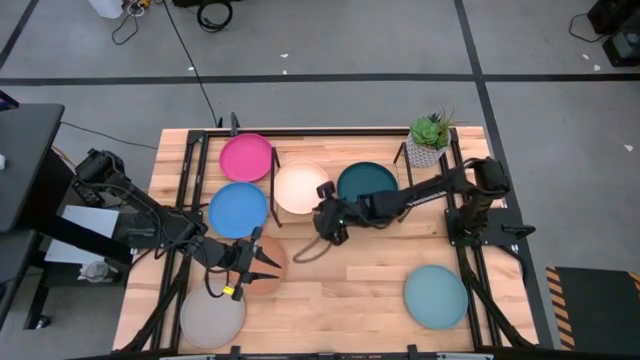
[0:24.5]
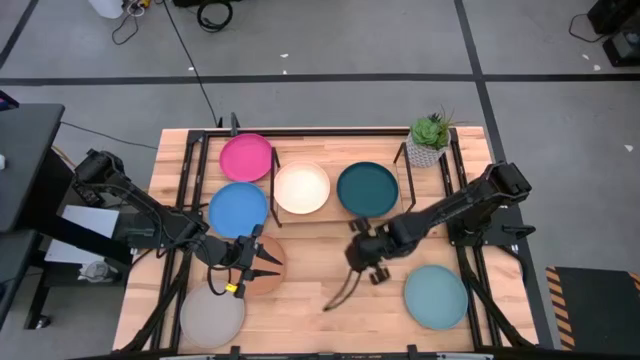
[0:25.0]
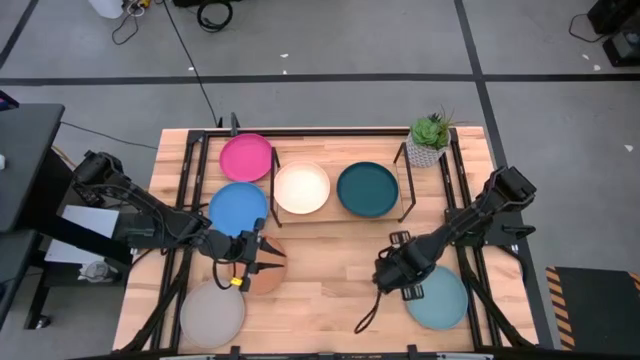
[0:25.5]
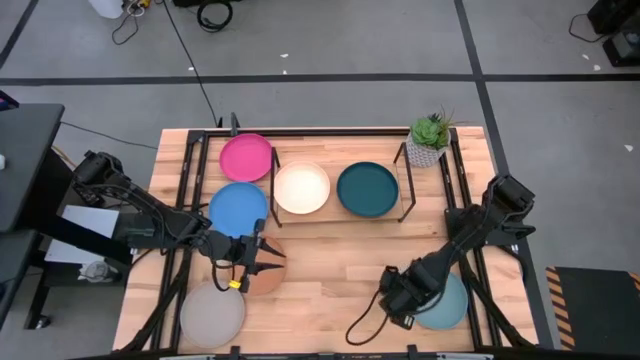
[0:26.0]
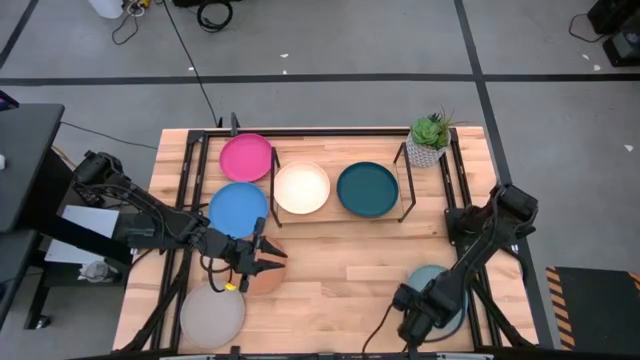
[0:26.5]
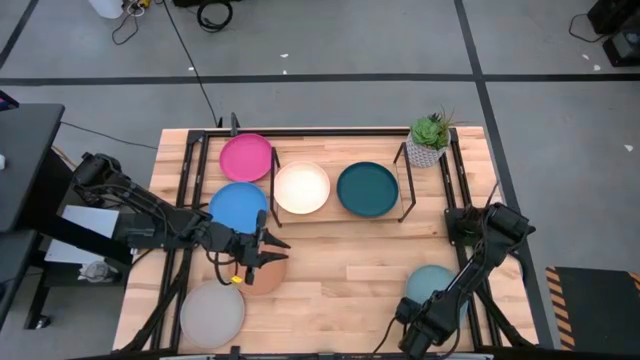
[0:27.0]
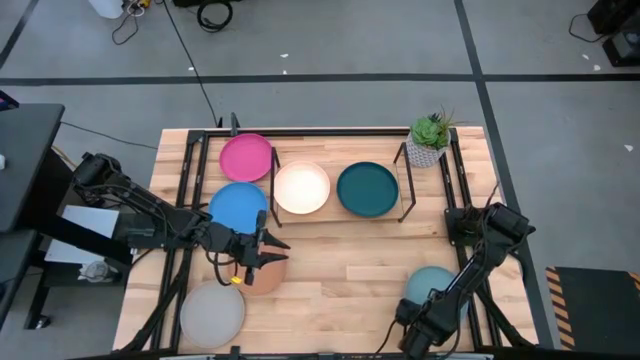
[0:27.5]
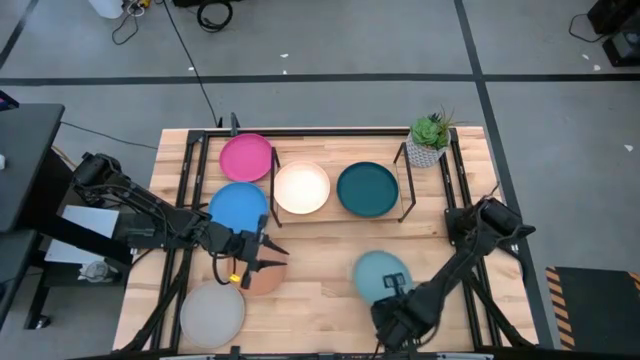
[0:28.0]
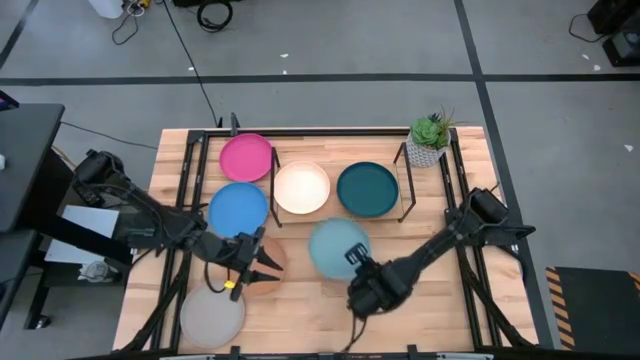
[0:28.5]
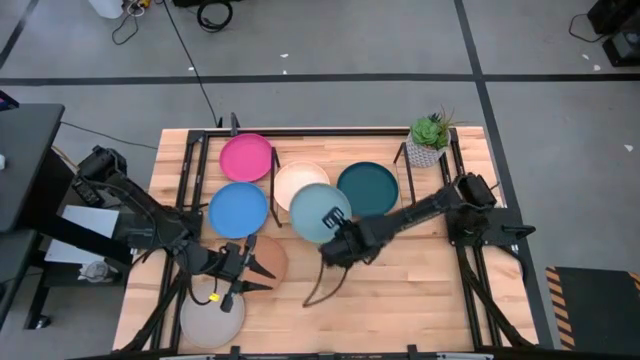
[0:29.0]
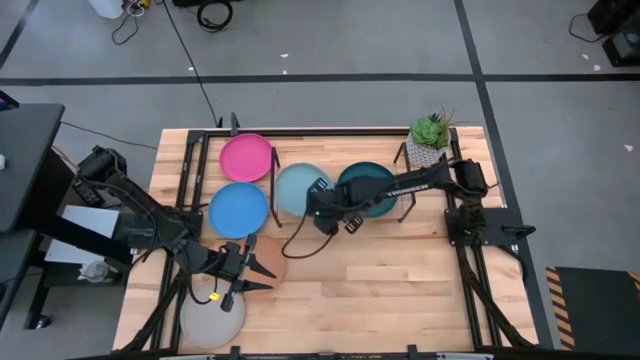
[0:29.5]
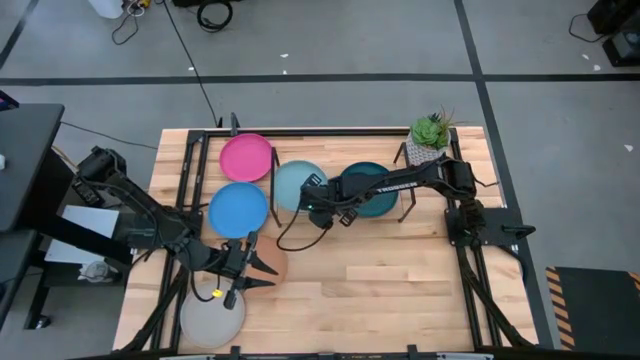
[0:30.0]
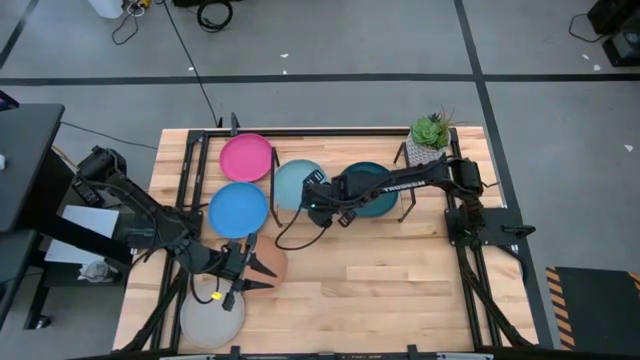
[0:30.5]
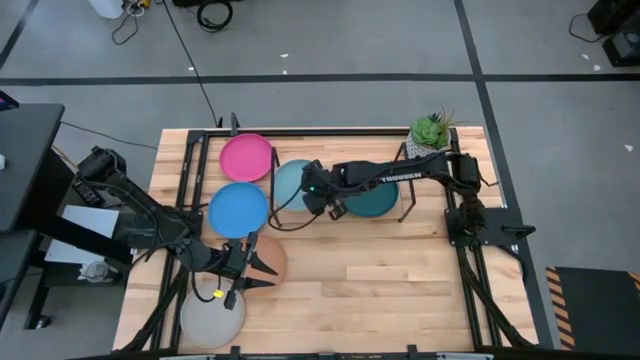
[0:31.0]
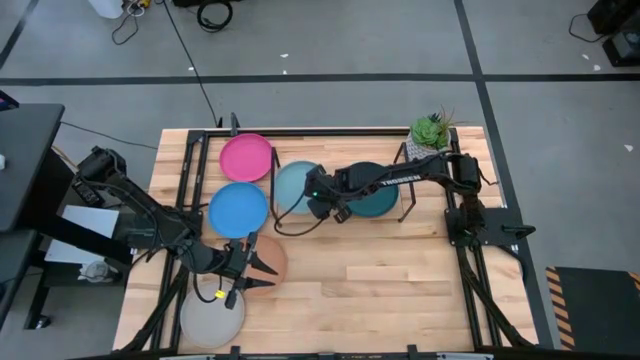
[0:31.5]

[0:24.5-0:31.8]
Task: Place and stack plates onto a shelf
Stack the light blue plate on top of the light orange plate on the shelf

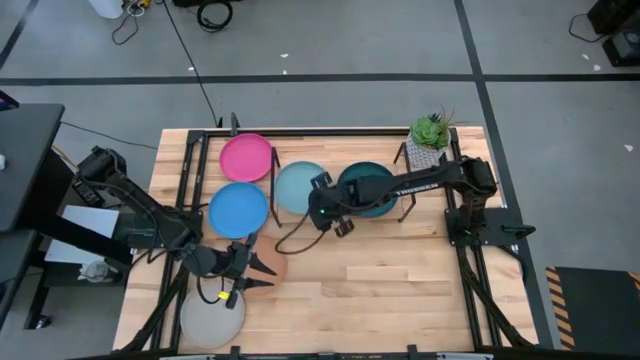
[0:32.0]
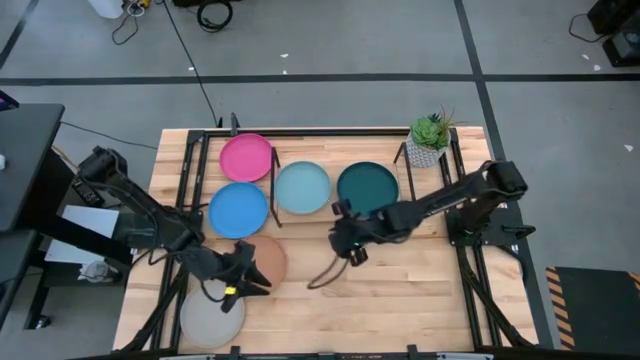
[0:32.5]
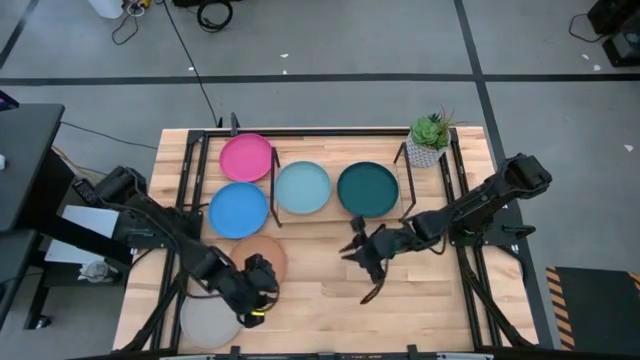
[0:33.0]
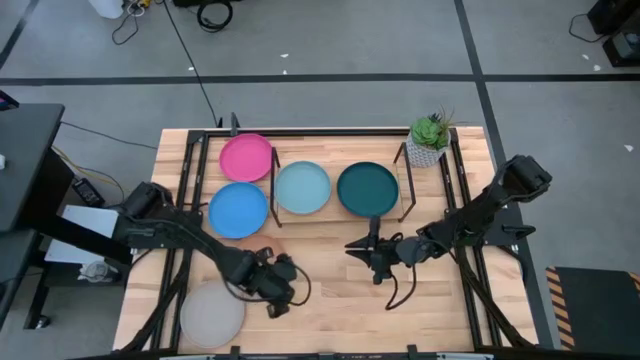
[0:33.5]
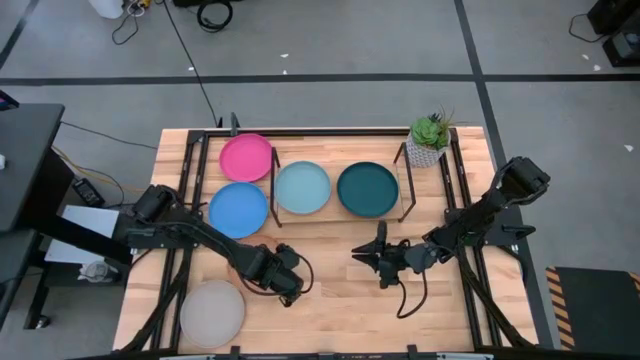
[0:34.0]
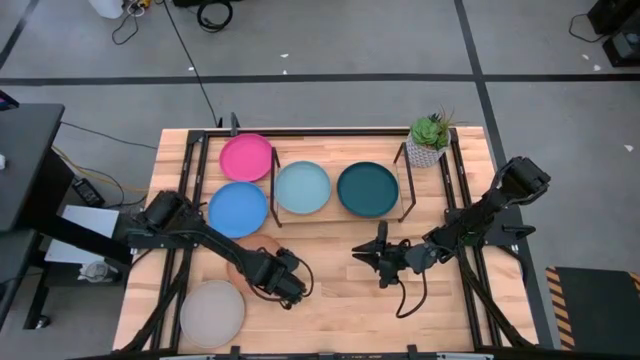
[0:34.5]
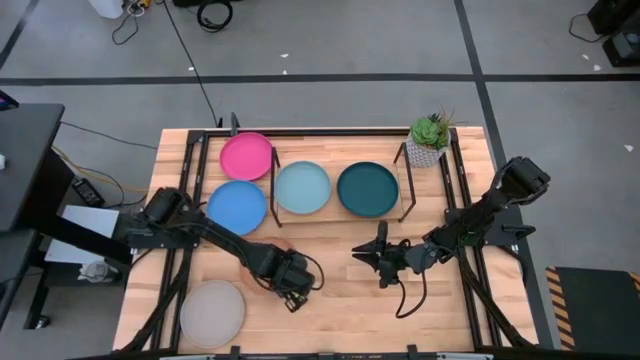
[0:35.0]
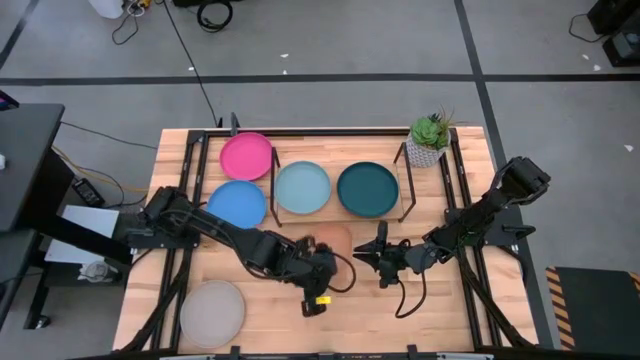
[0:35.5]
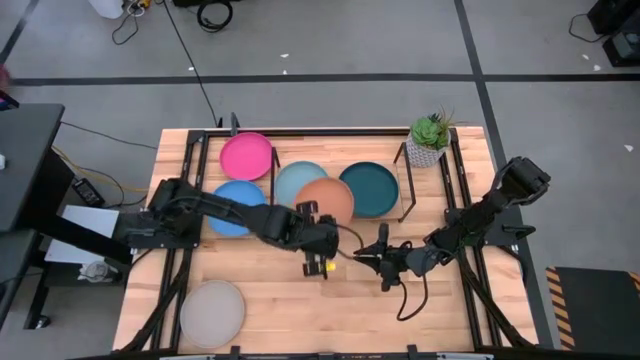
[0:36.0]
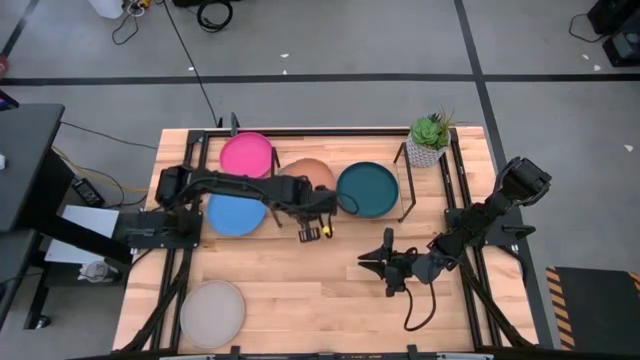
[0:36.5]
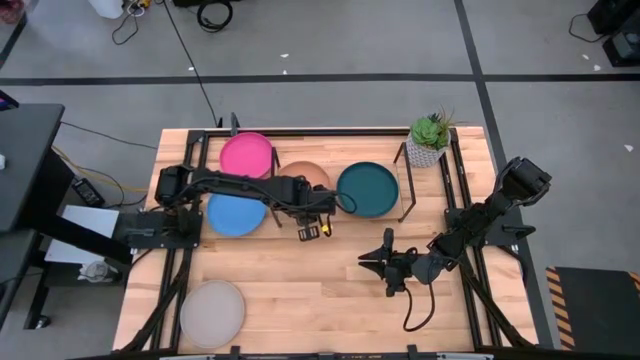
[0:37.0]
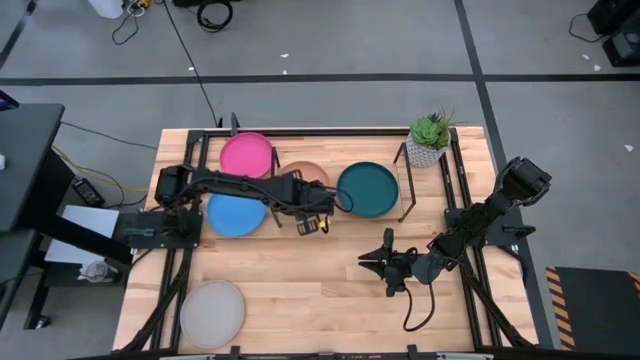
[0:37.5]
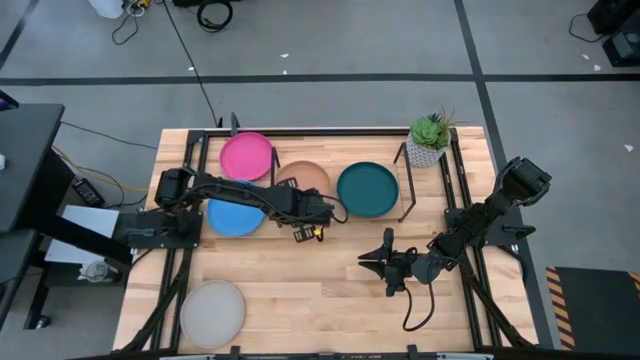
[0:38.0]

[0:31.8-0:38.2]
Stack the brown plate on top of the light blue plate on the shelf

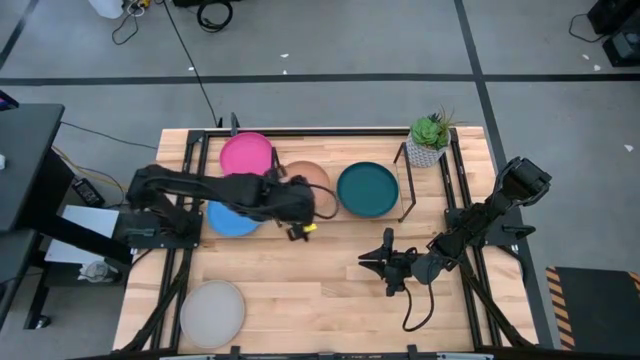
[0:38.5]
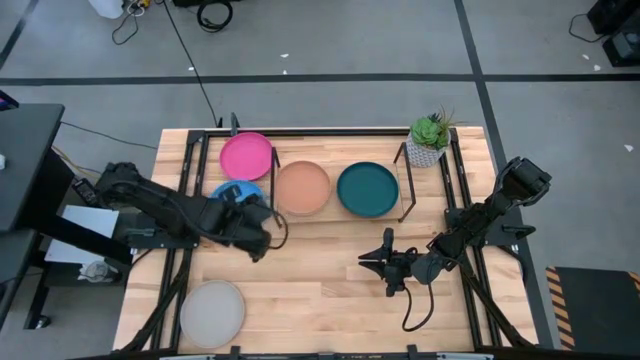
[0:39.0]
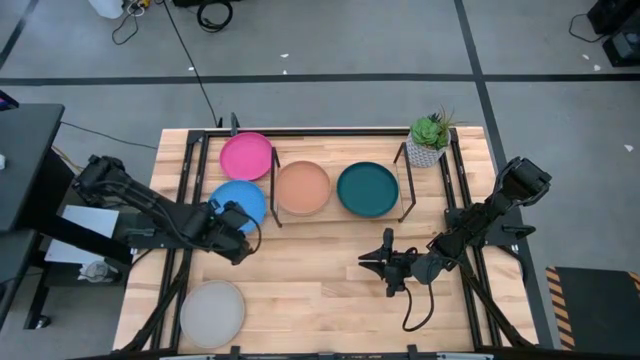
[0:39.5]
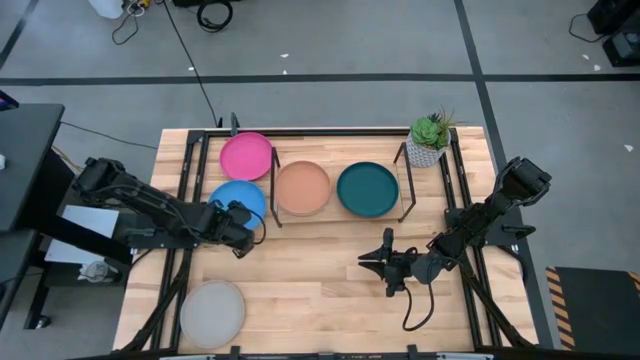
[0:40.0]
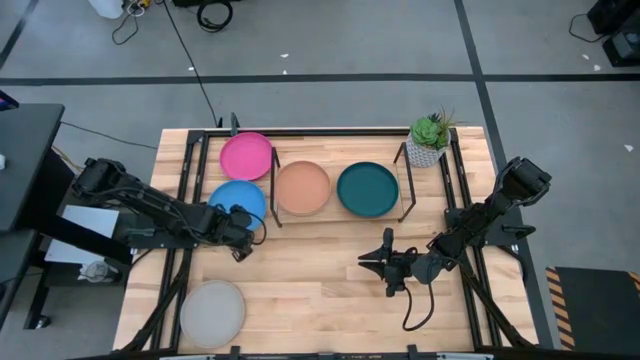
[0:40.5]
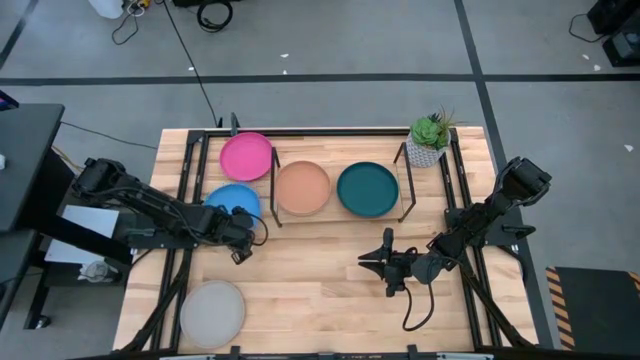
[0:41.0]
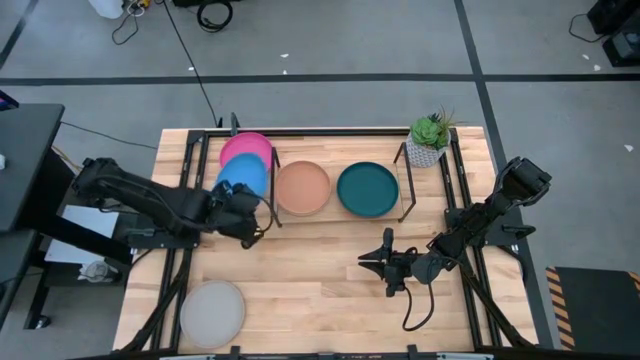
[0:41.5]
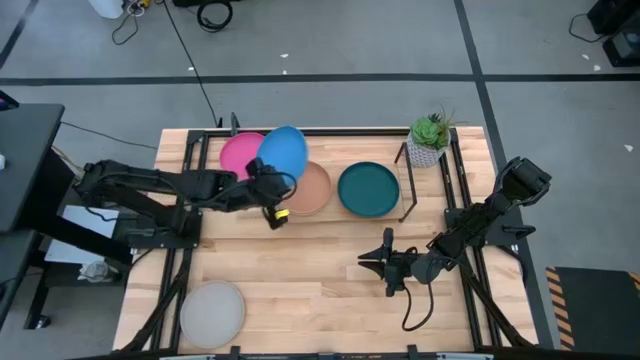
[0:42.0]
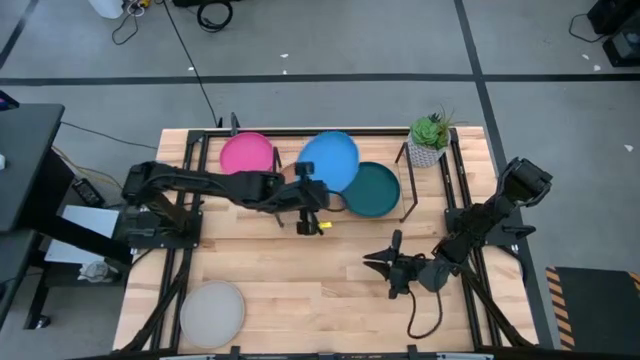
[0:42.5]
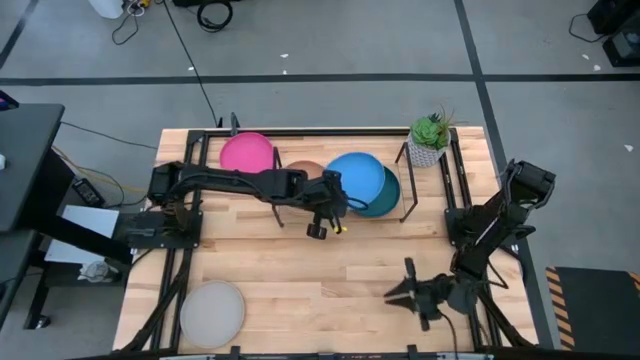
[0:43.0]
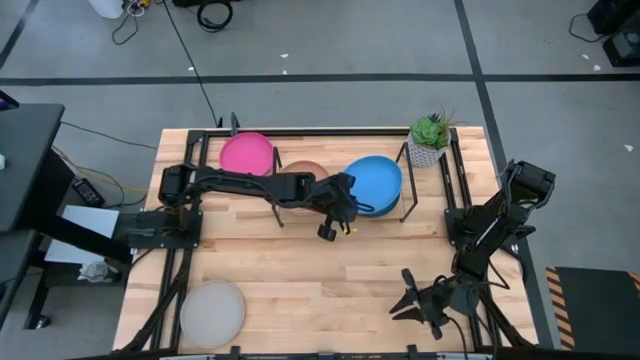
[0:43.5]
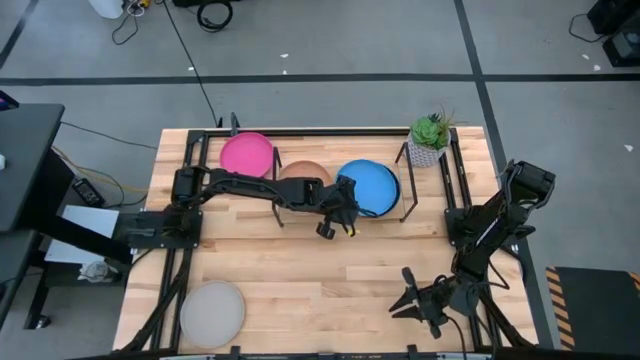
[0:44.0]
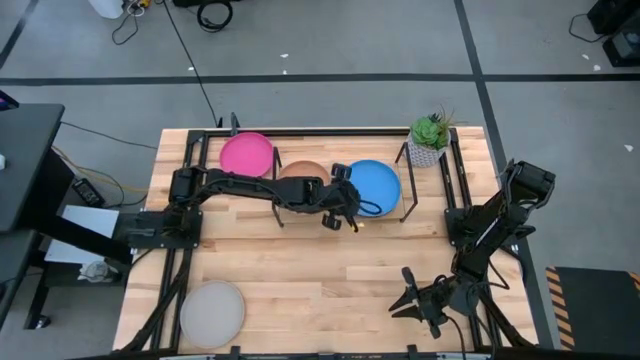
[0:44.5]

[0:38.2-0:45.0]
Stack the blue plate on top of the dark green plate on the shelf
